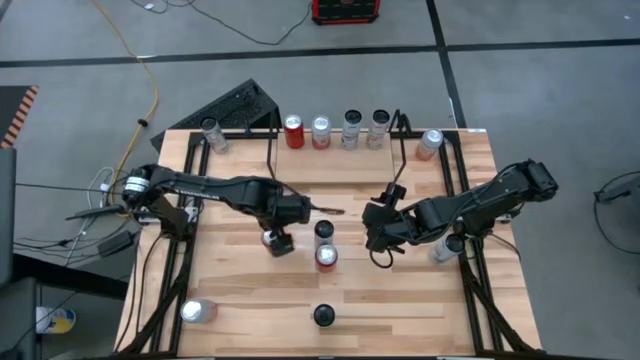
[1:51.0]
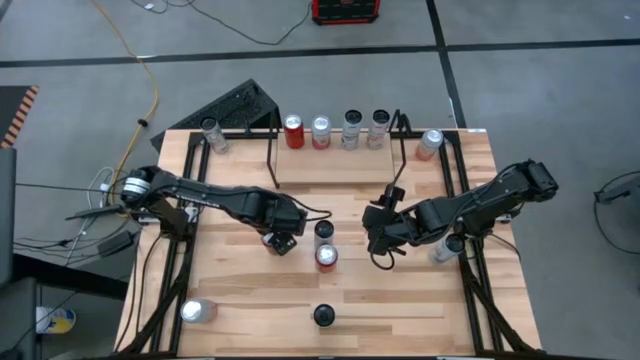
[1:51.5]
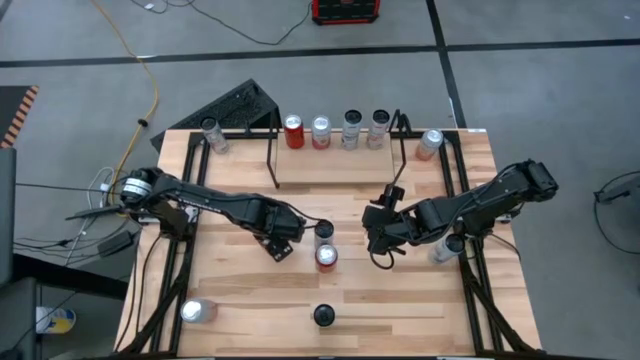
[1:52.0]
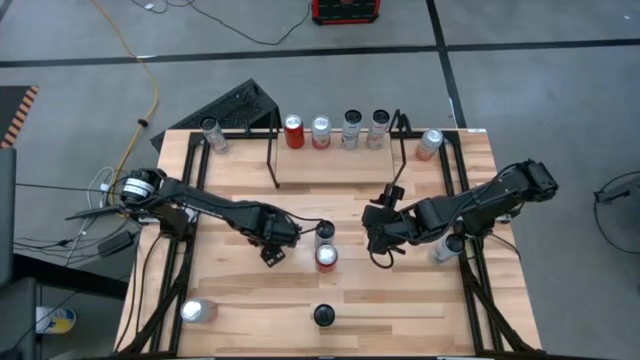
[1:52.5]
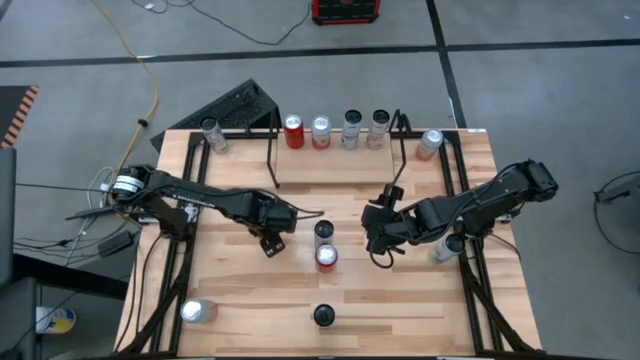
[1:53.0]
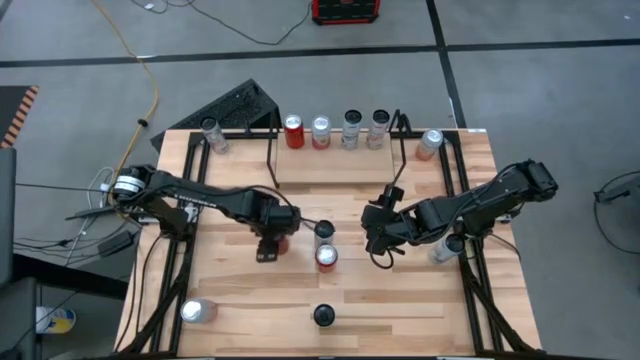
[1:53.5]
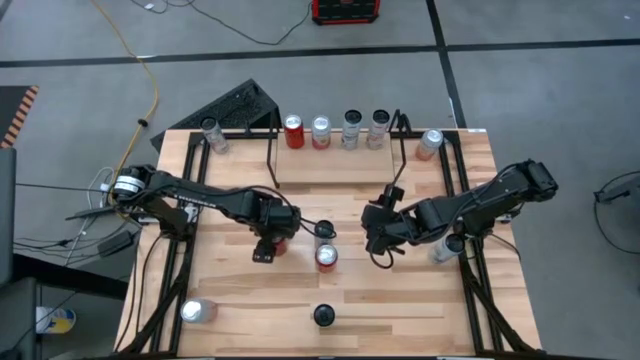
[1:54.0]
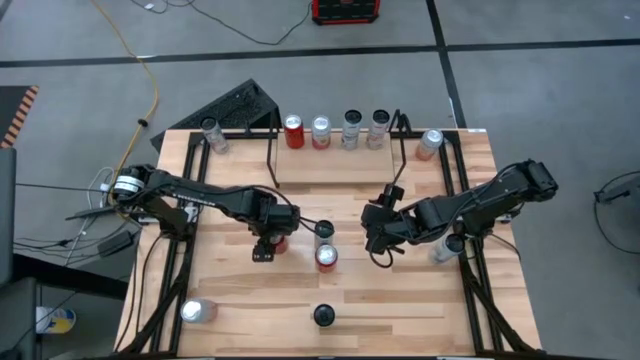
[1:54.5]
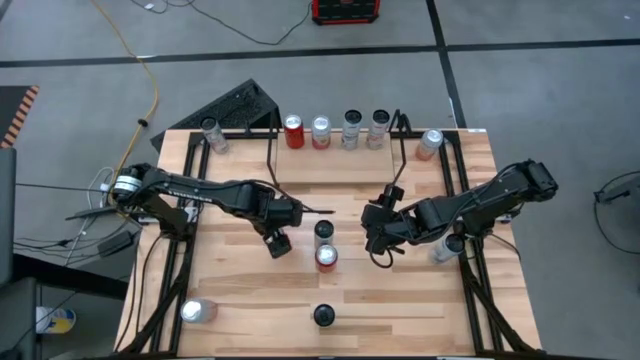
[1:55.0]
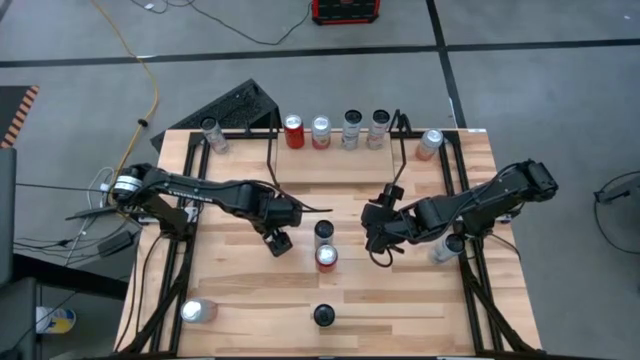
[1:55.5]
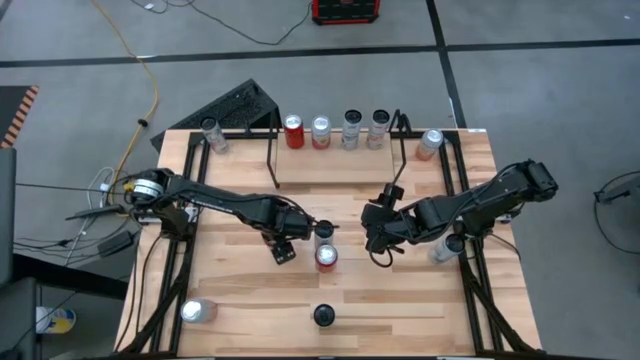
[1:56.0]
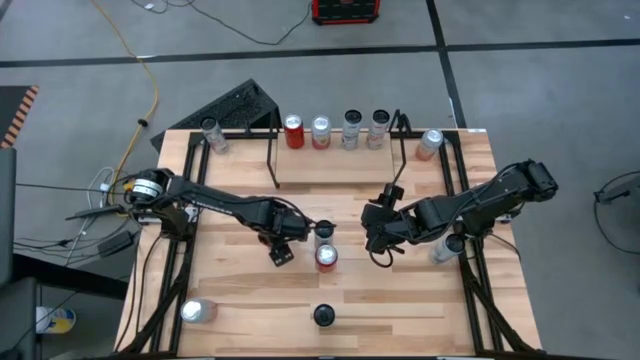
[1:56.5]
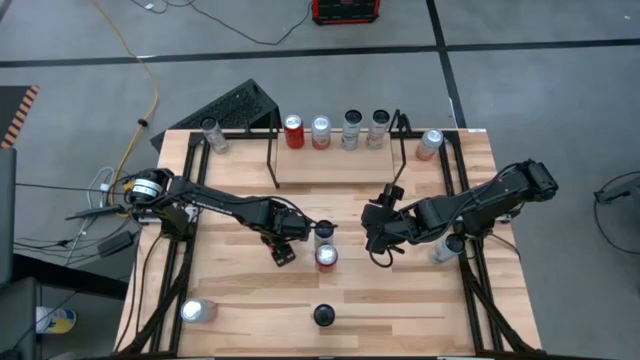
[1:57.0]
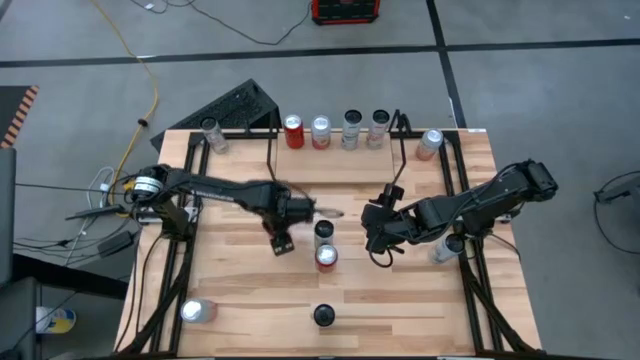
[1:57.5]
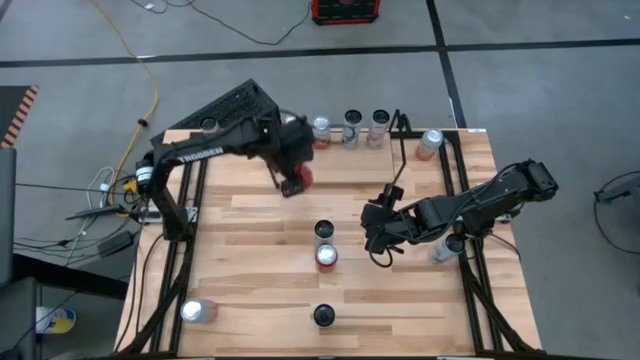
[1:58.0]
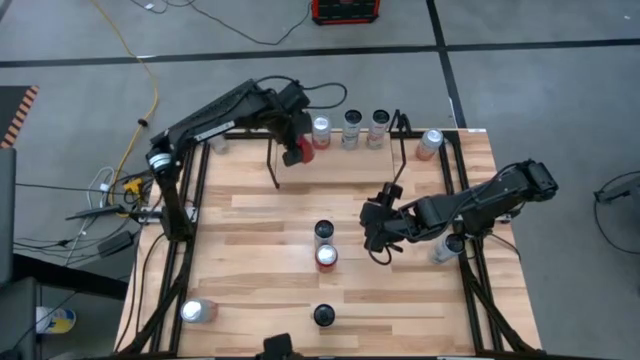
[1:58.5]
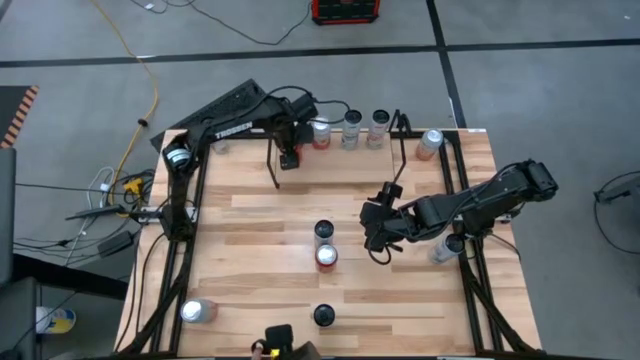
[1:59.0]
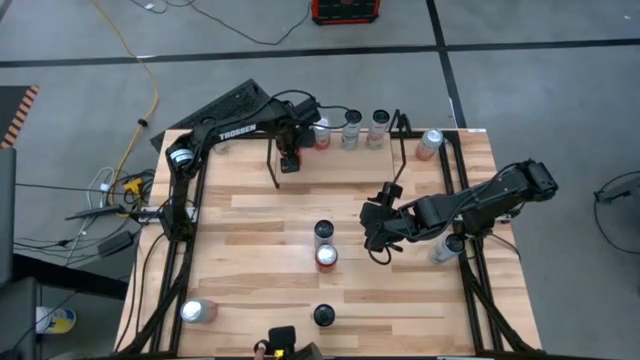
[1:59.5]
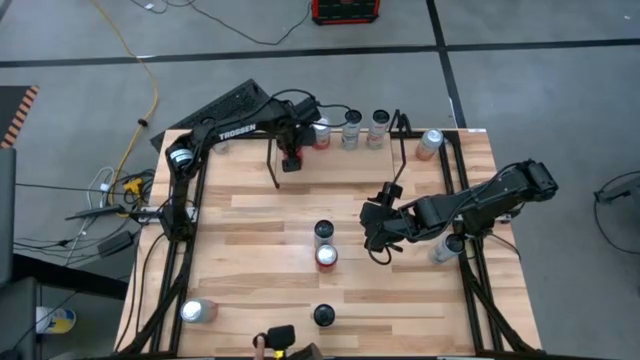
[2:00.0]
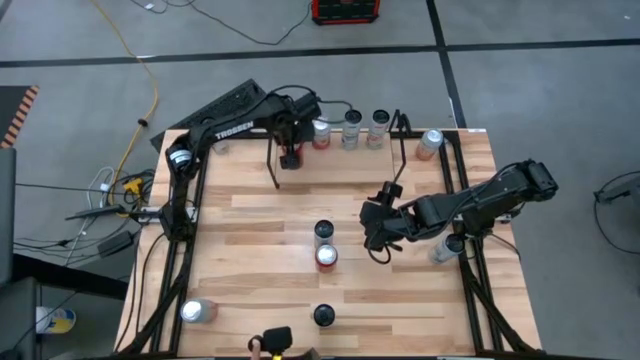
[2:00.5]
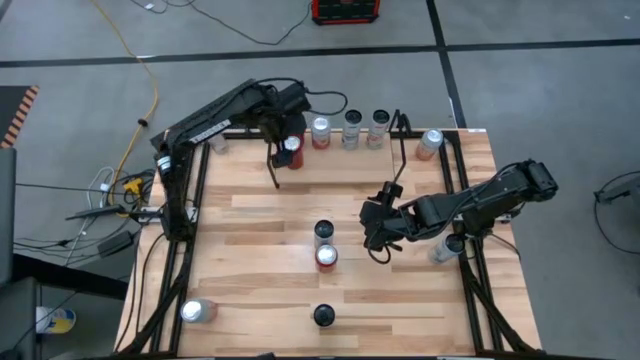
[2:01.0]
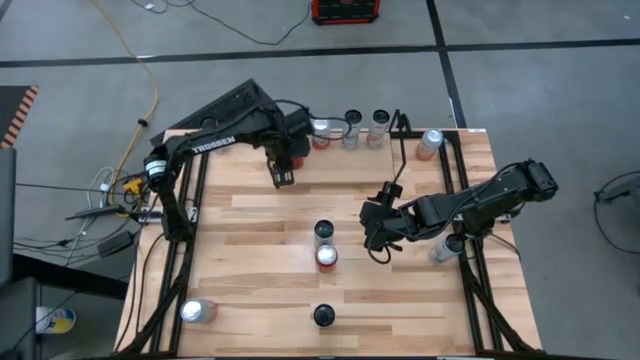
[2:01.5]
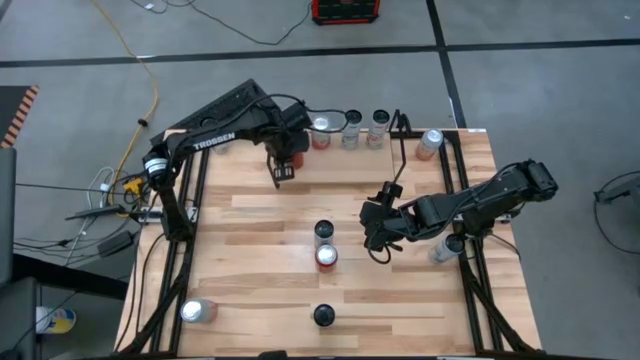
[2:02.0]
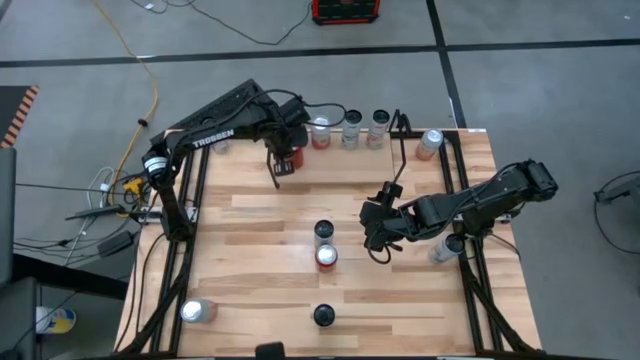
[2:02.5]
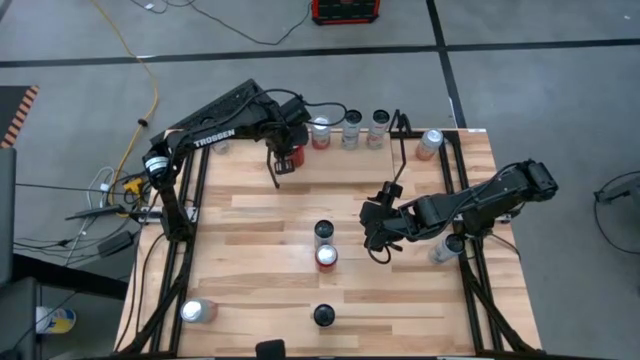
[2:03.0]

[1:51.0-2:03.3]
Task: Place canned beverage on shelf
Put the top red black soda can on the shelf aligned with the other red black soda can
